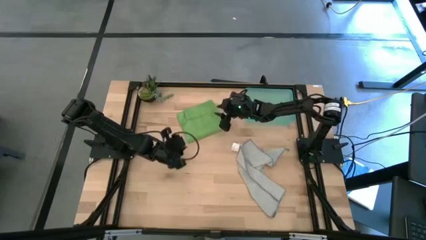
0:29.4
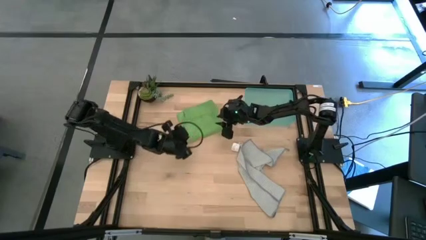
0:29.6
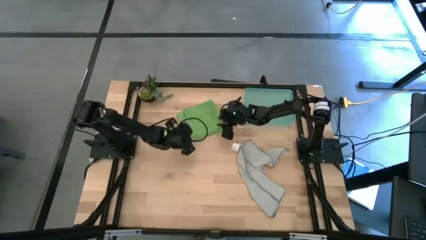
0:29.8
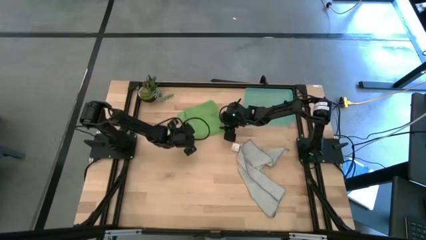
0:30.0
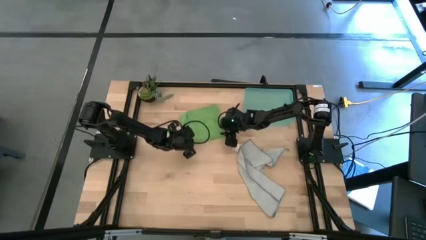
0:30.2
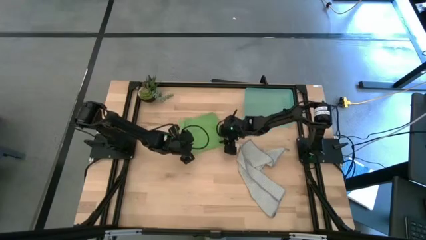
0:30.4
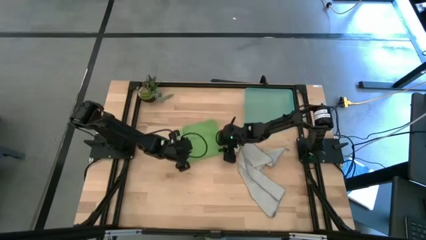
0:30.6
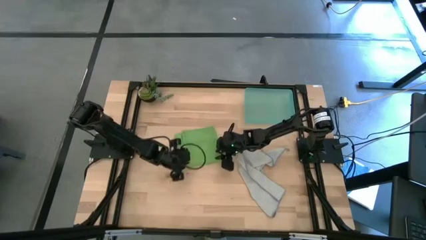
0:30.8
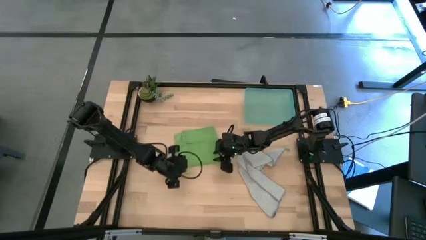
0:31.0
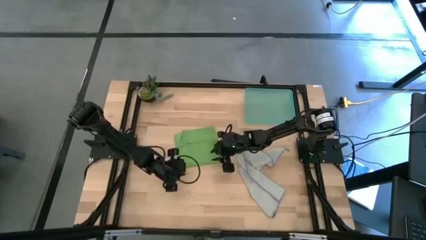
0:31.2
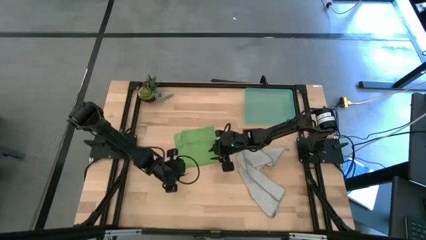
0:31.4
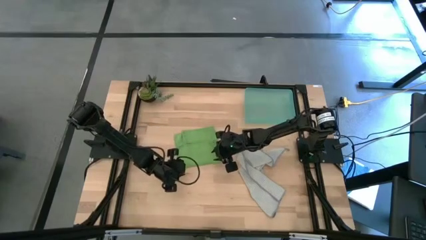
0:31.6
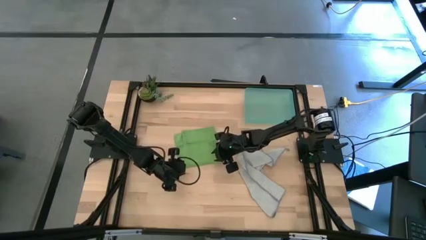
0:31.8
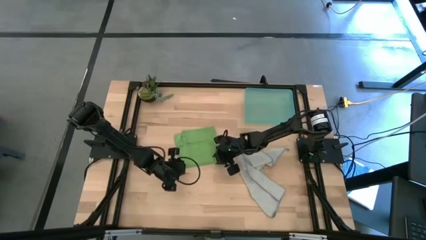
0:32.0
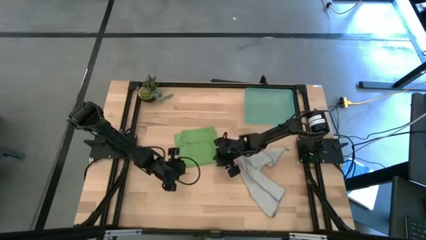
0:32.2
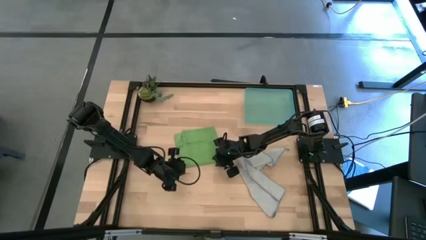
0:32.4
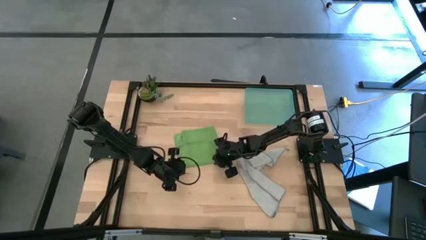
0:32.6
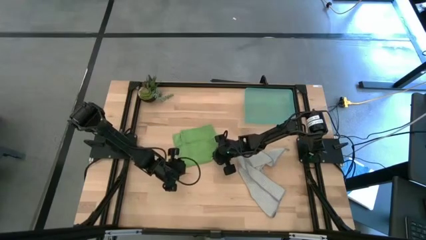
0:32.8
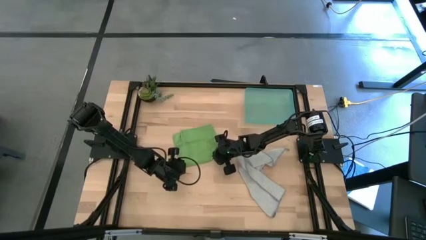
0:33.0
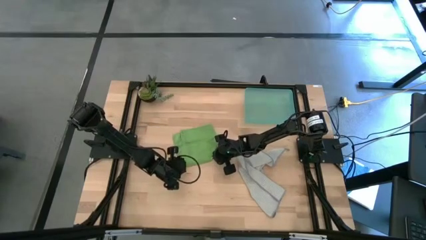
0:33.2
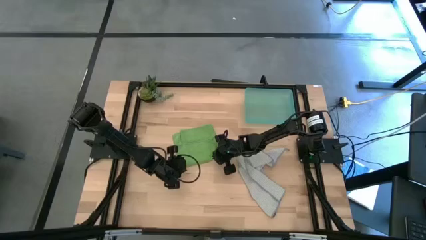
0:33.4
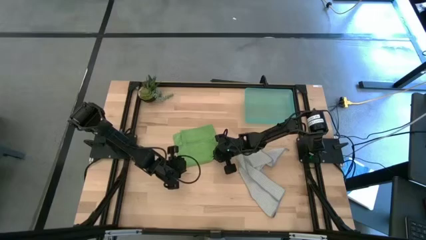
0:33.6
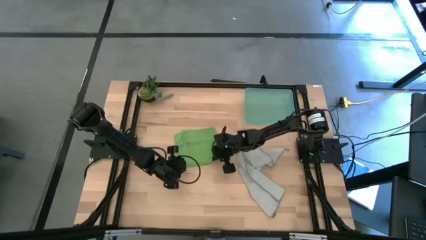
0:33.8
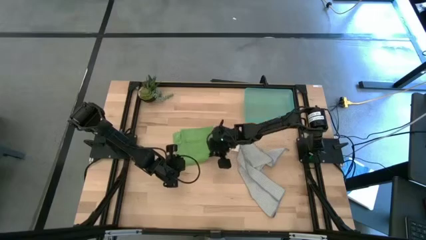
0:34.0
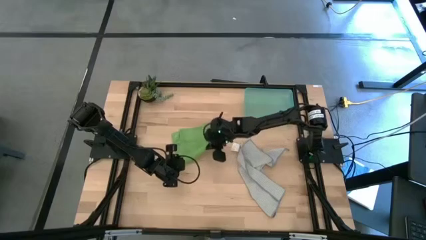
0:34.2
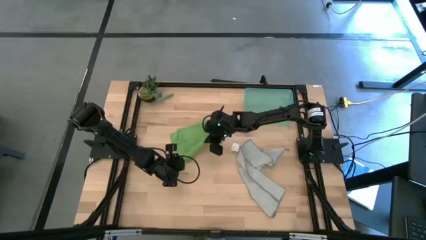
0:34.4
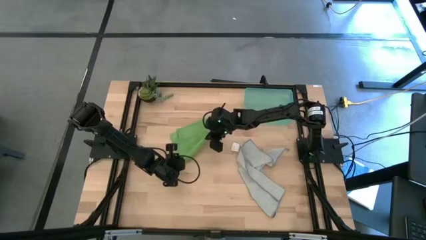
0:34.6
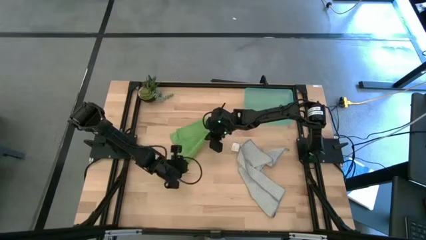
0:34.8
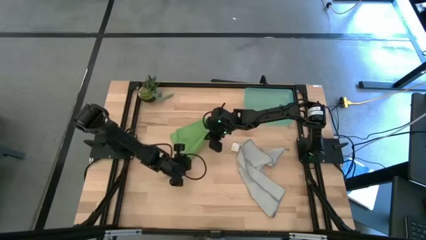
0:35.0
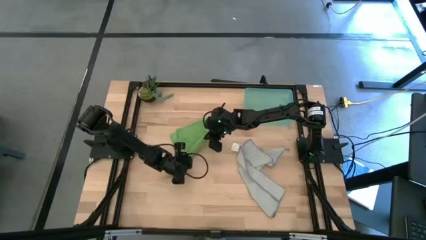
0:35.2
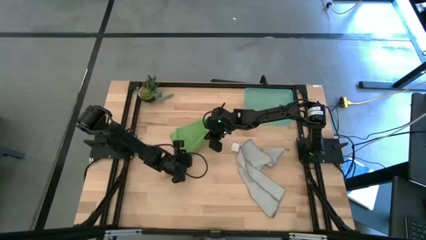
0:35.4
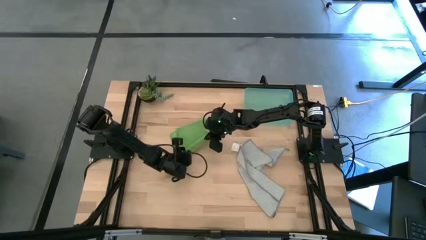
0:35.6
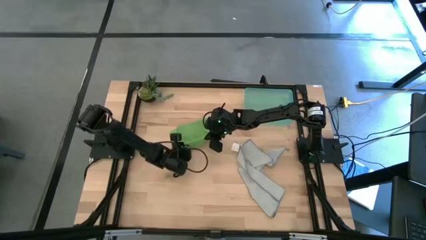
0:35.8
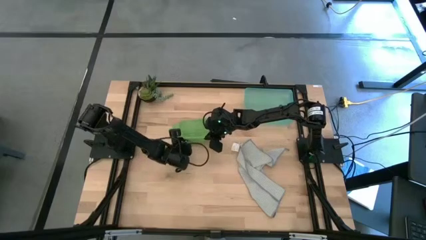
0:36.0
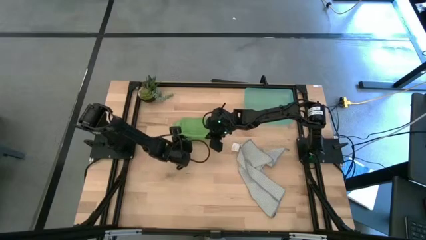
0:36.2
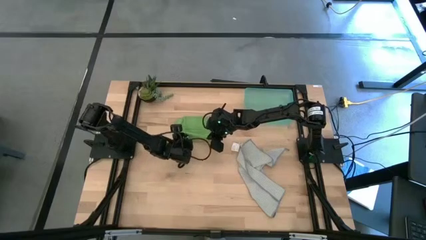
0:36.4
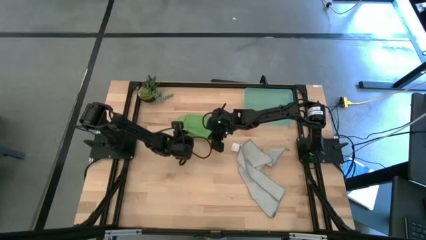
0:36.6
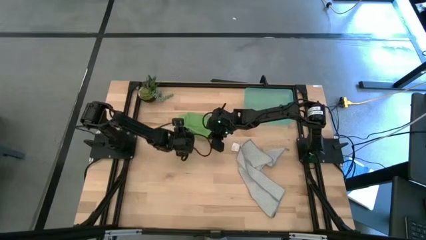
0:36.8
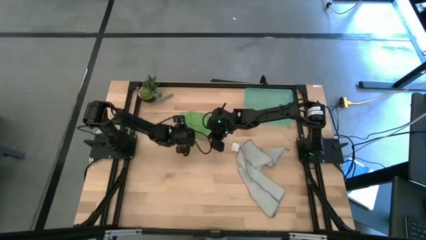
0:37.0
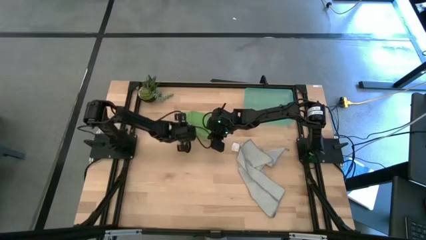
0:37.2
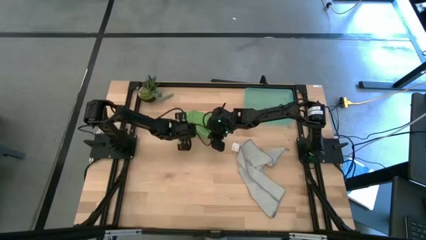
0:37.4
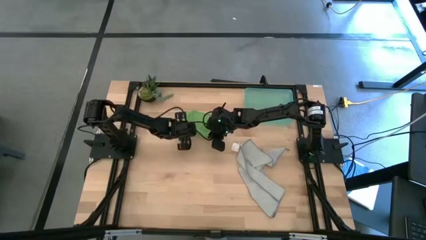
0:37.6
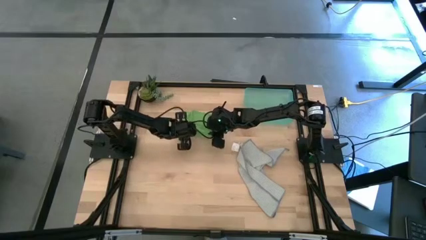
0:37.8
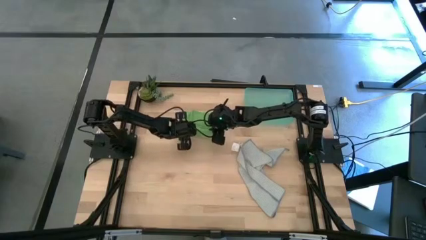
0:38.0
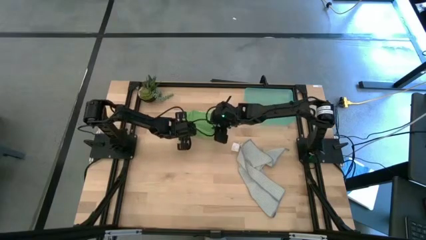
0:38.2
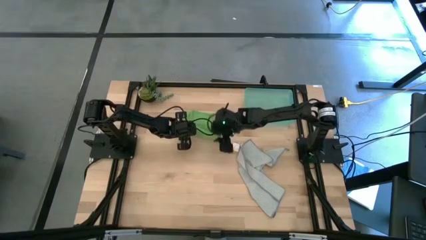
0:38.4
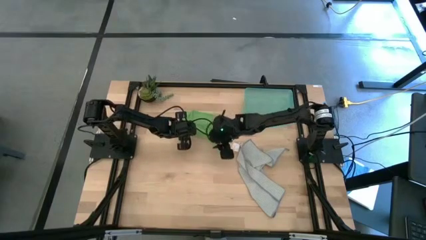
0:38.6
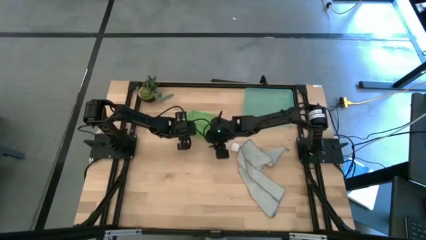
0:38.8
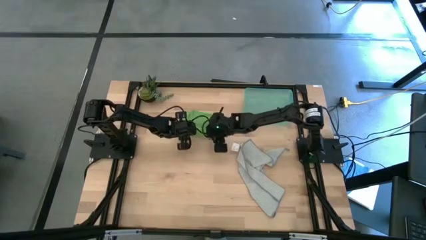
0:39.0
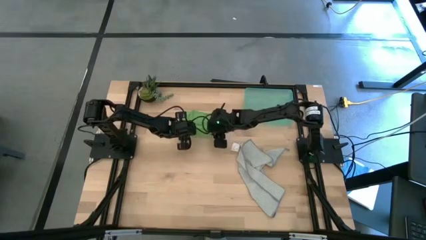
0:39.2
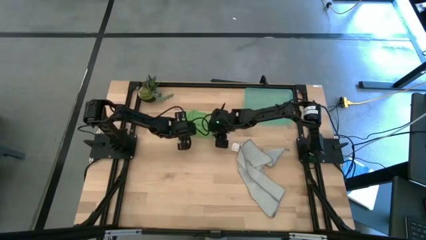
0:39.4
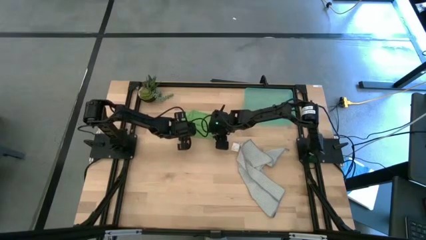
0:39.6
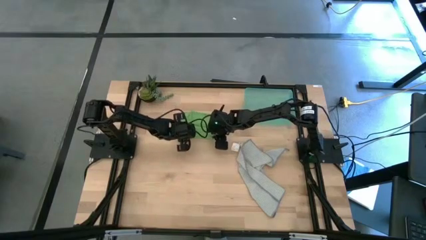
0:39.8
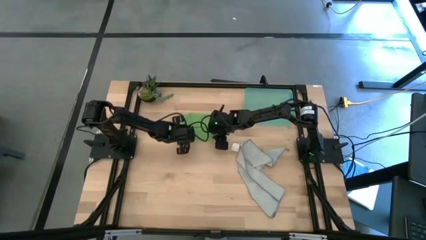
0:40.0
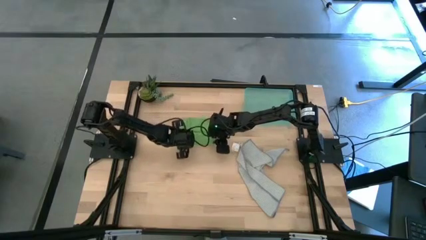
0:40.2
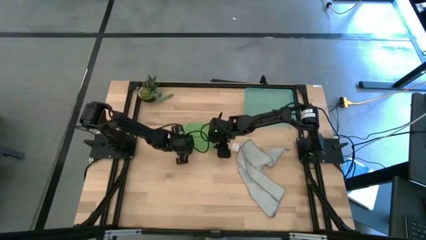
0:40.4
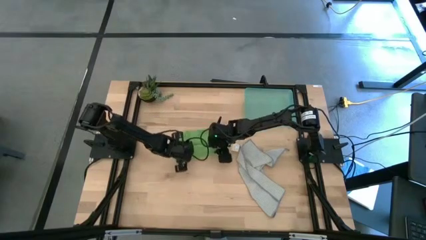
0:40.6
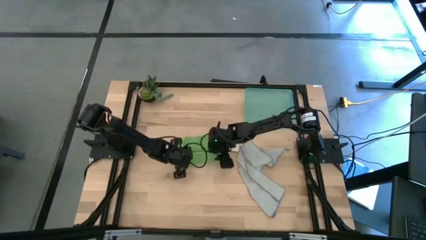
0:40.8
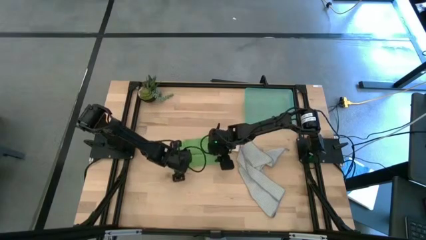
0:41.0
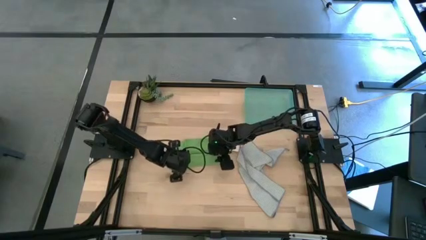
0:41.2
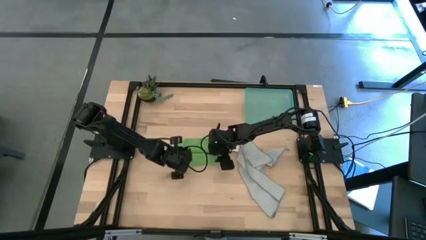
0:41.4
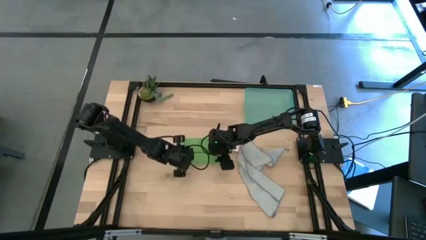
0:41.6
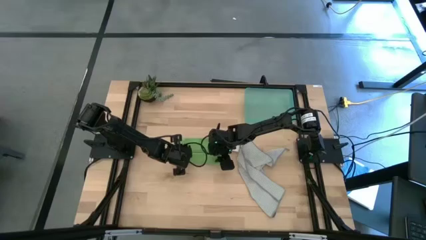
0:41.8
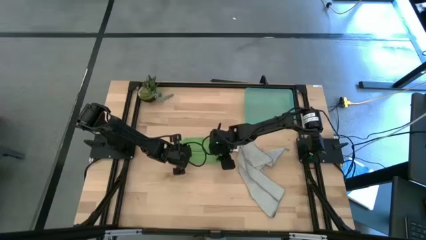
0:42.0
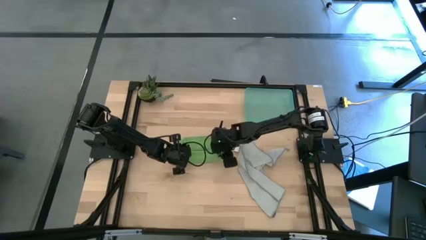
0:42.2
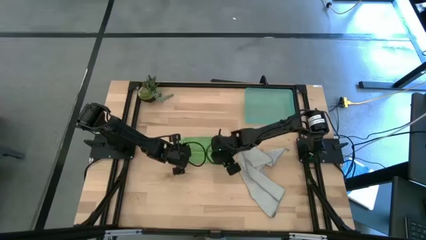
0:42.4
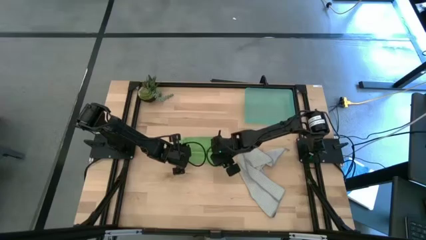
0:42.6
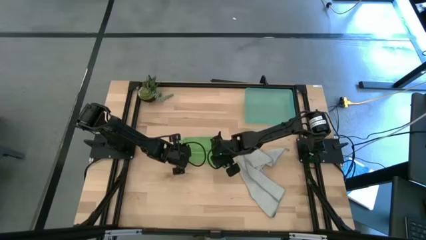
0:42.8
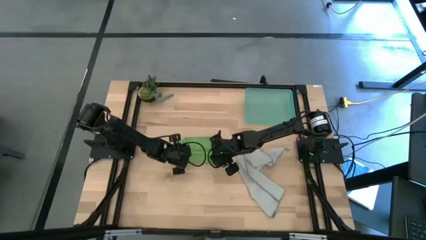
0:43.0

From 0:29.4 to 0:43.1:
Task: Roll microfiber towels into tight, uniform cylinder then place into a basket
Roll the green microfiber towel
